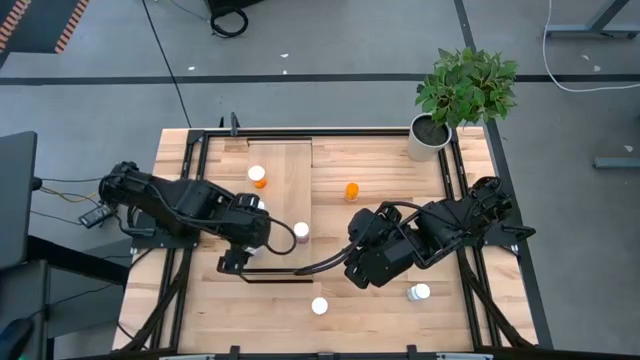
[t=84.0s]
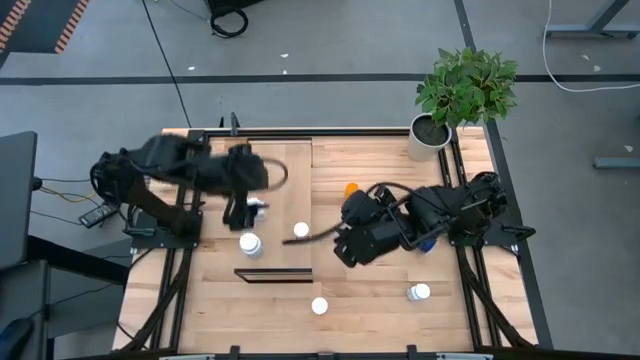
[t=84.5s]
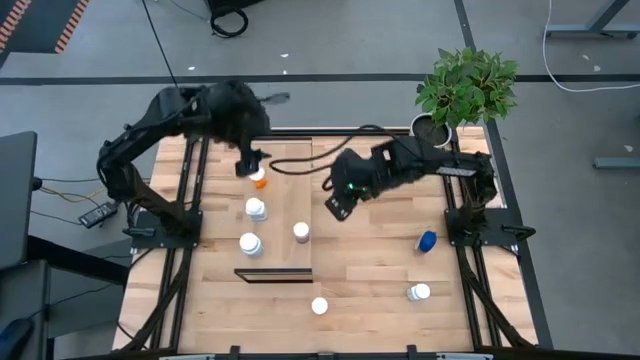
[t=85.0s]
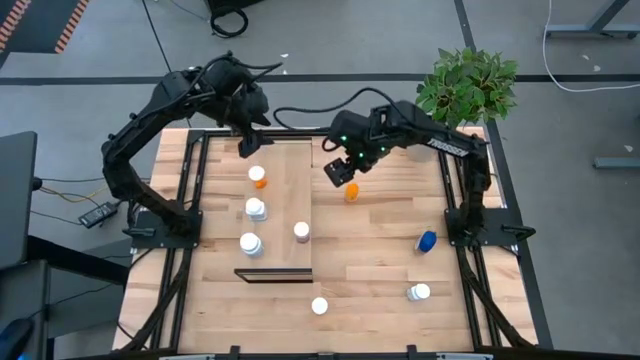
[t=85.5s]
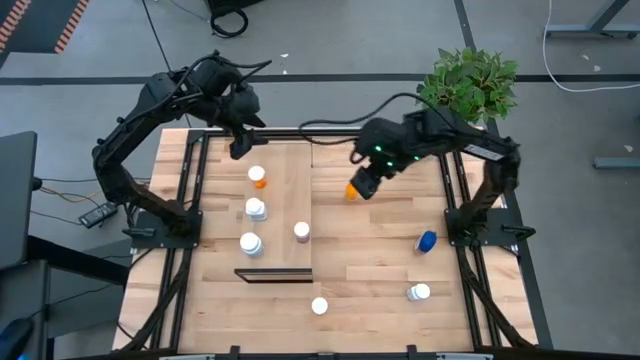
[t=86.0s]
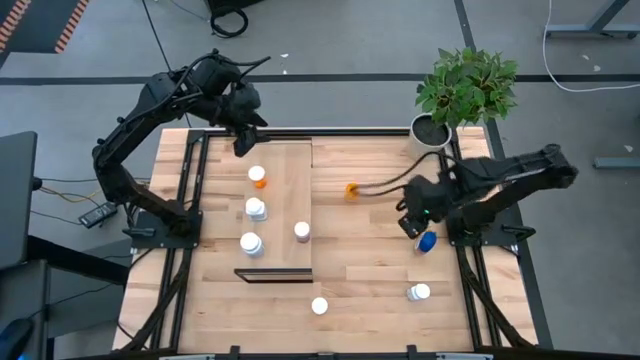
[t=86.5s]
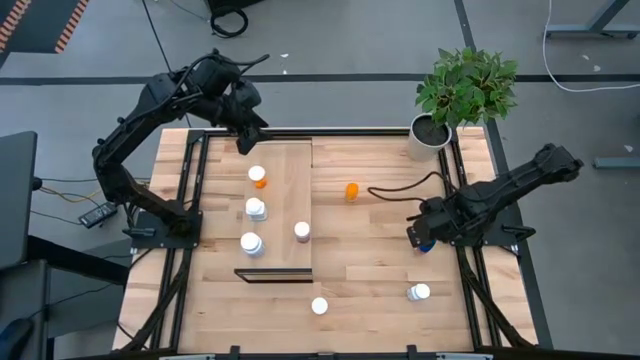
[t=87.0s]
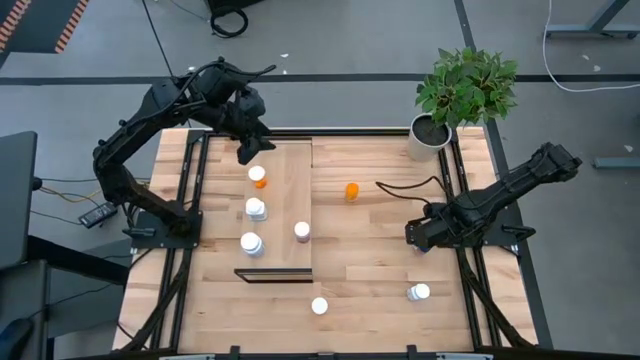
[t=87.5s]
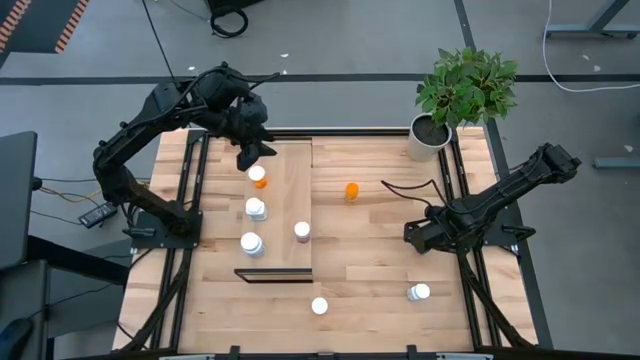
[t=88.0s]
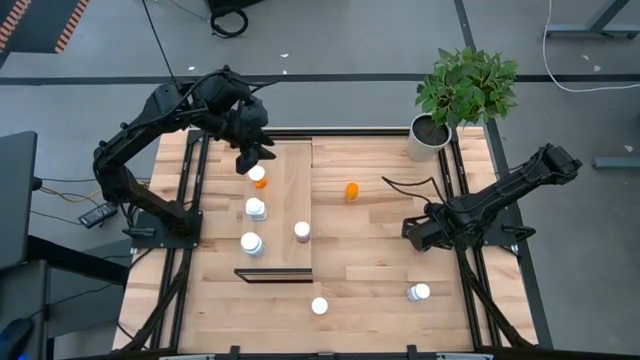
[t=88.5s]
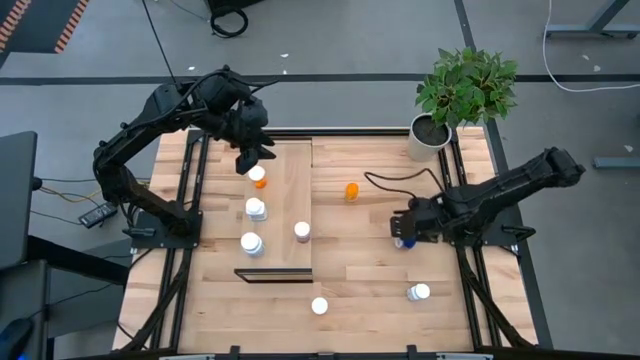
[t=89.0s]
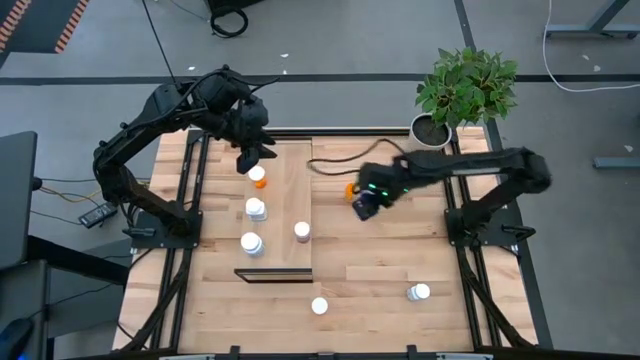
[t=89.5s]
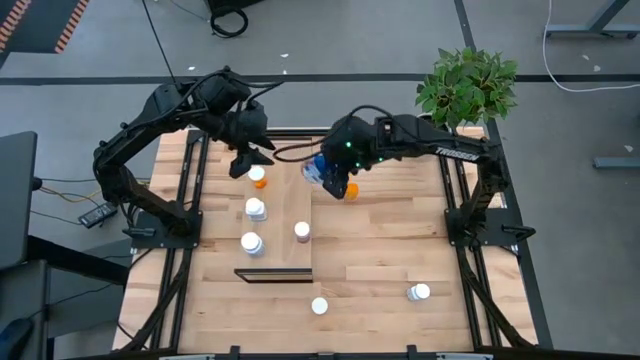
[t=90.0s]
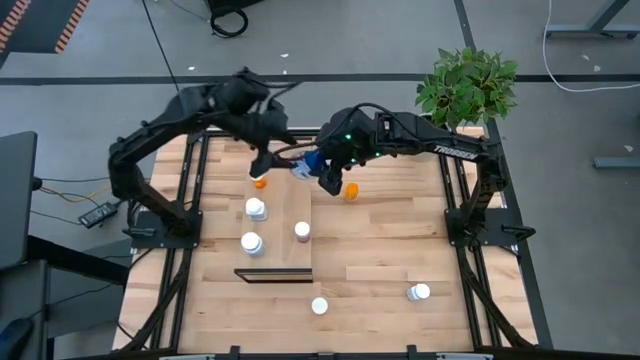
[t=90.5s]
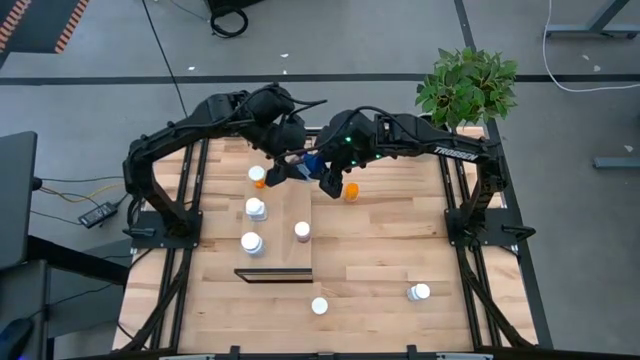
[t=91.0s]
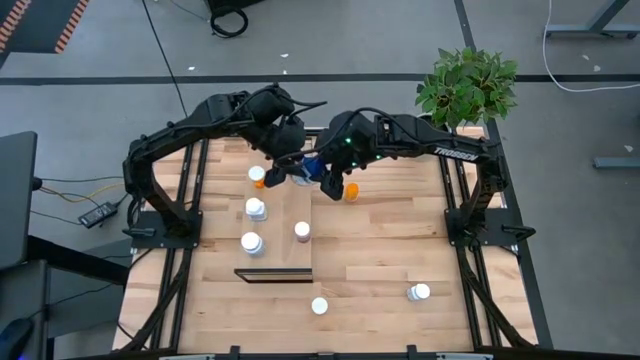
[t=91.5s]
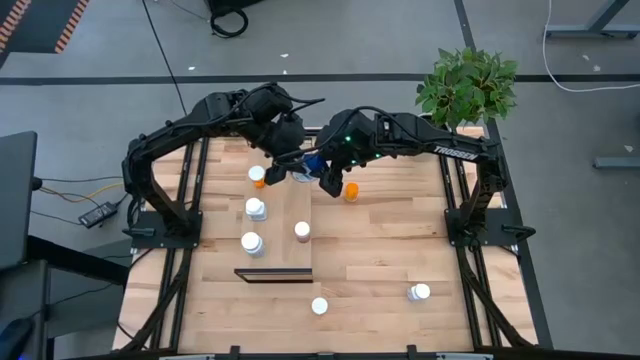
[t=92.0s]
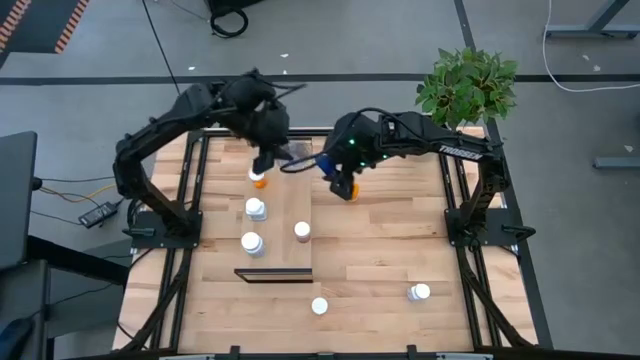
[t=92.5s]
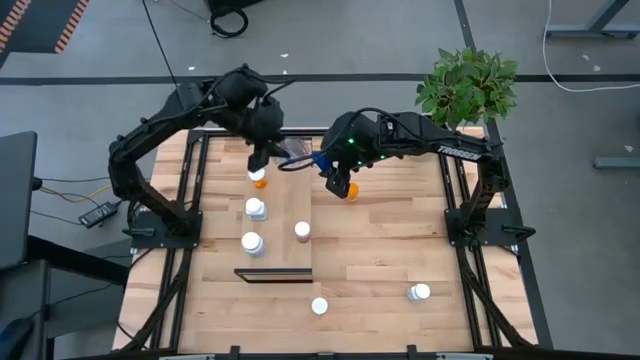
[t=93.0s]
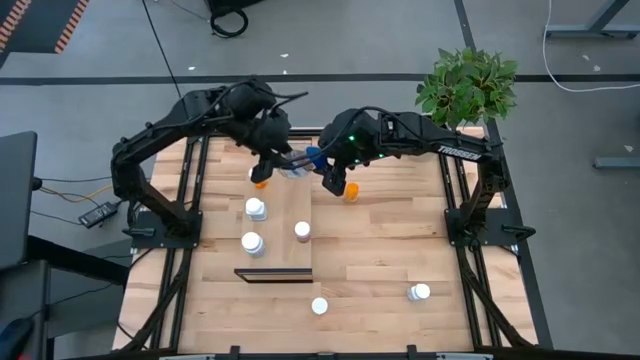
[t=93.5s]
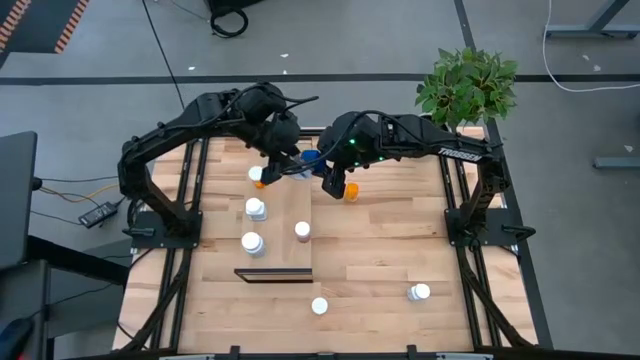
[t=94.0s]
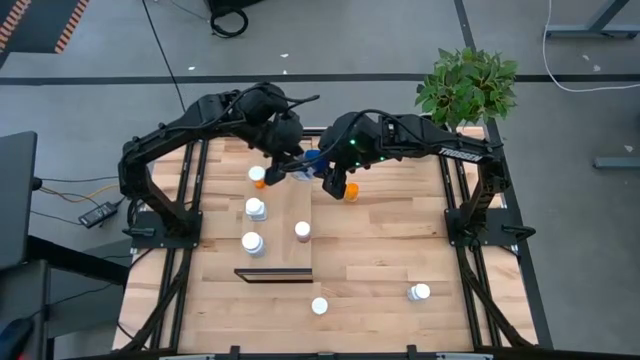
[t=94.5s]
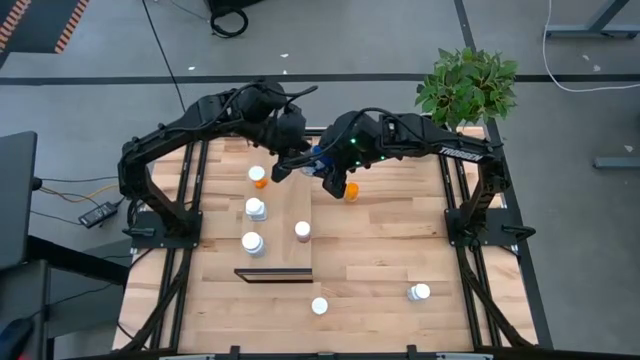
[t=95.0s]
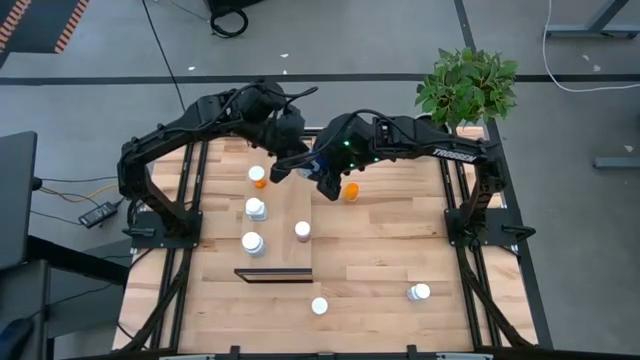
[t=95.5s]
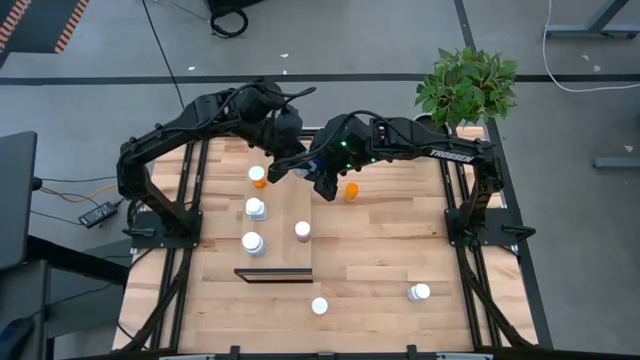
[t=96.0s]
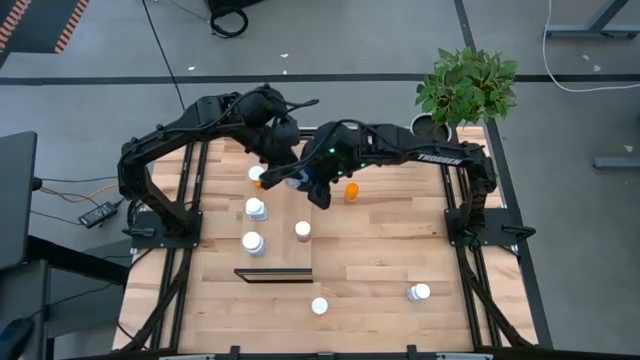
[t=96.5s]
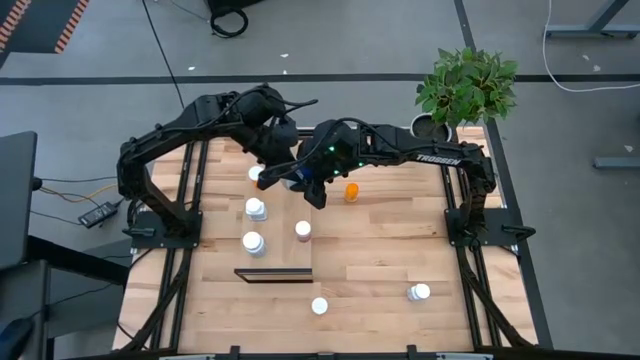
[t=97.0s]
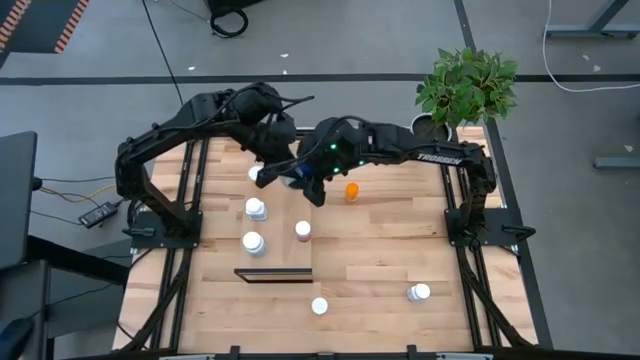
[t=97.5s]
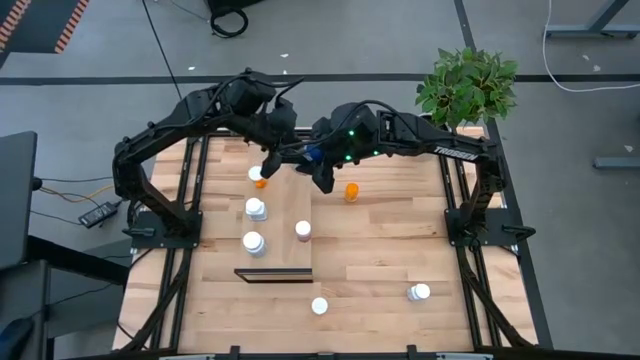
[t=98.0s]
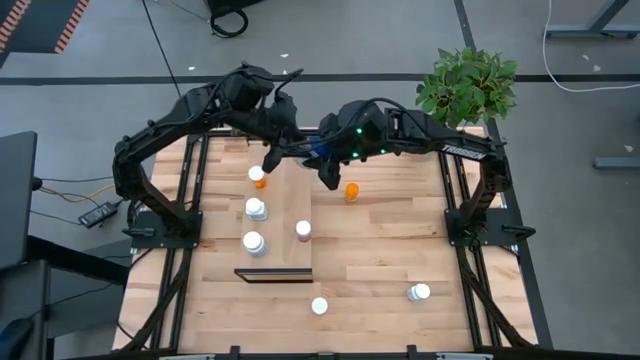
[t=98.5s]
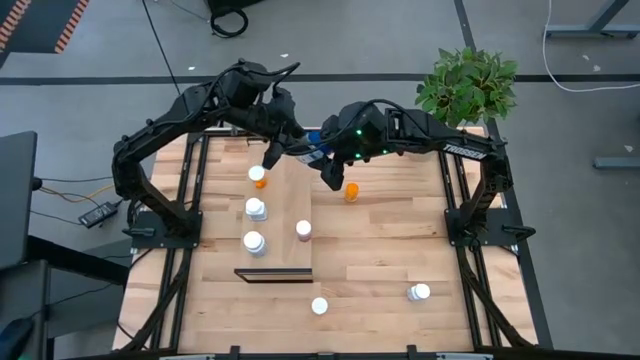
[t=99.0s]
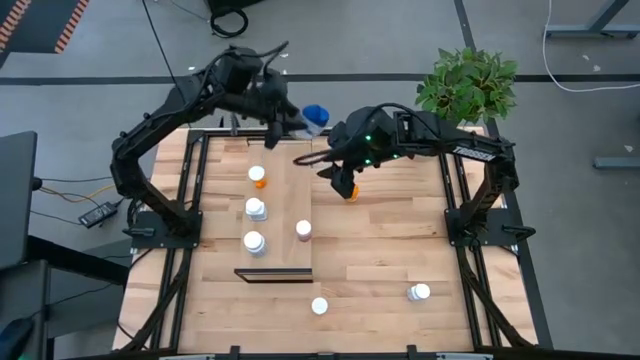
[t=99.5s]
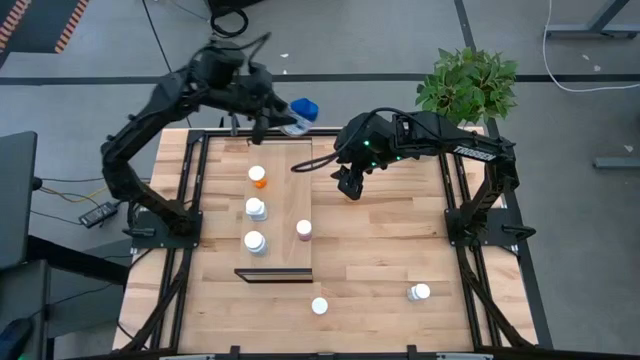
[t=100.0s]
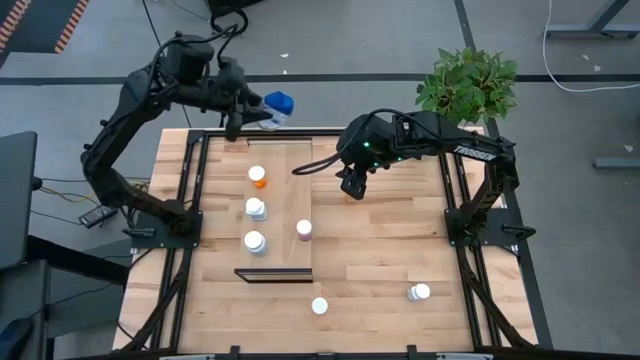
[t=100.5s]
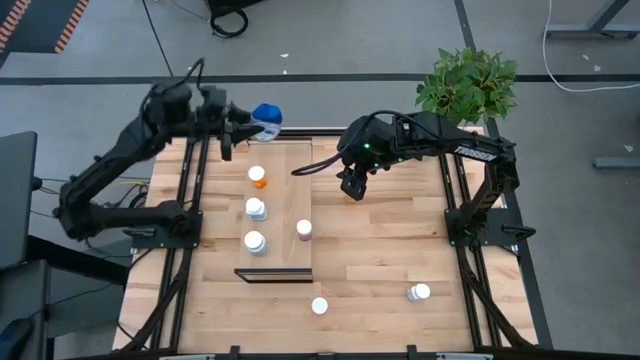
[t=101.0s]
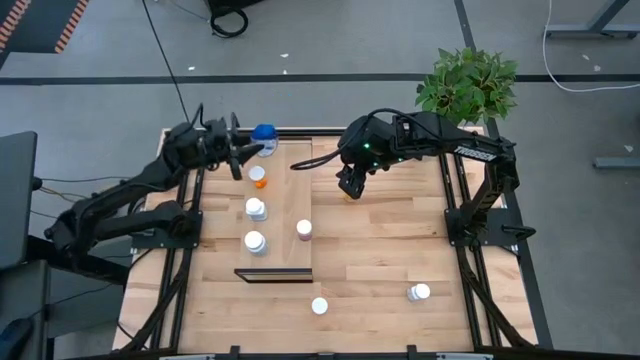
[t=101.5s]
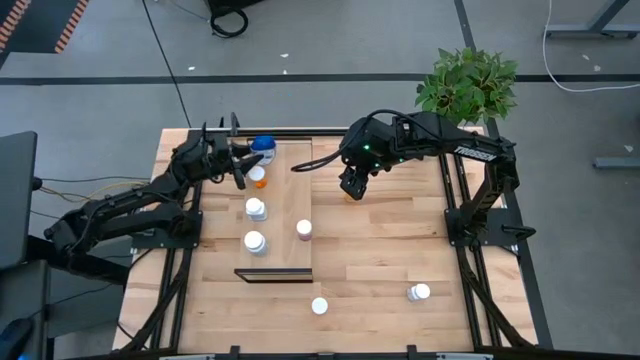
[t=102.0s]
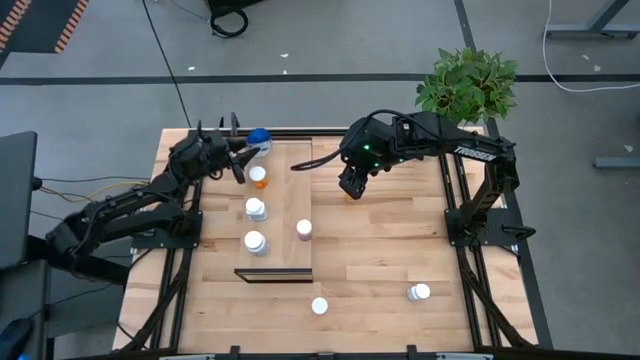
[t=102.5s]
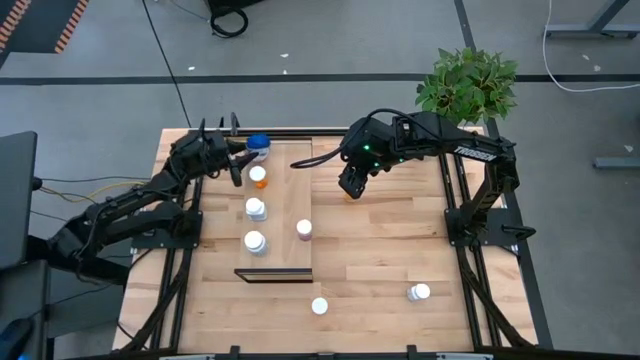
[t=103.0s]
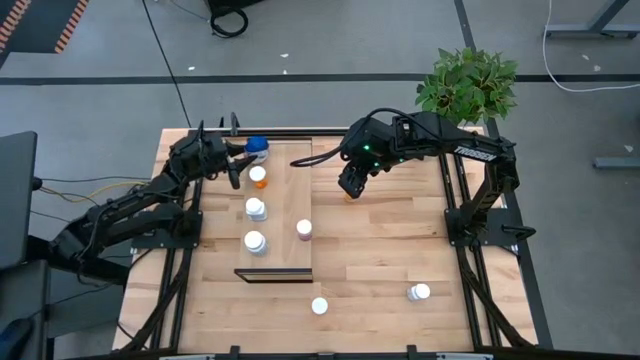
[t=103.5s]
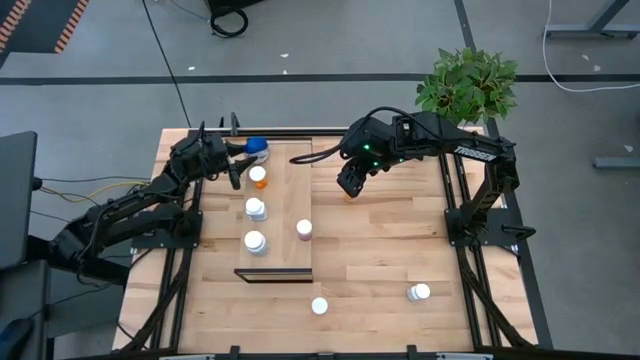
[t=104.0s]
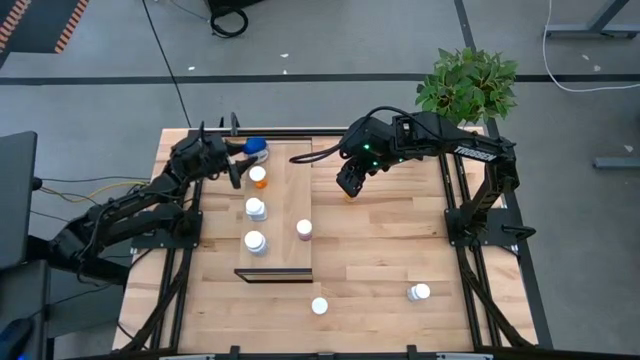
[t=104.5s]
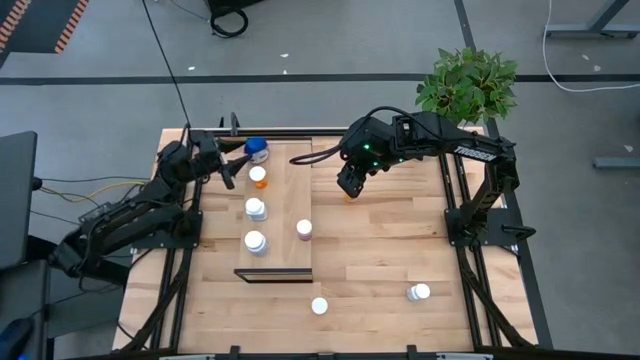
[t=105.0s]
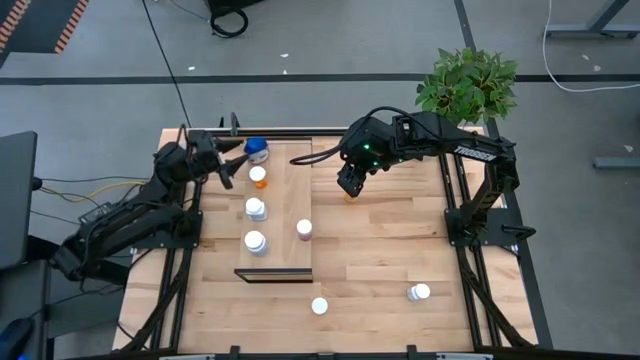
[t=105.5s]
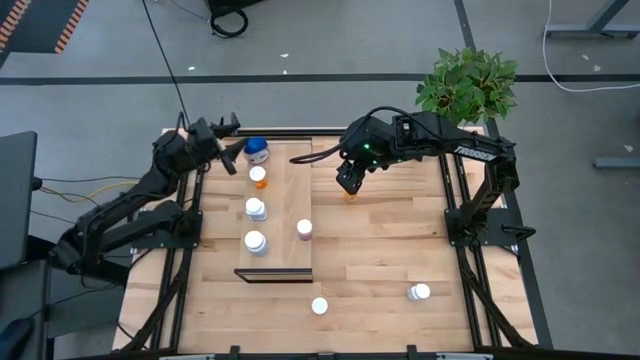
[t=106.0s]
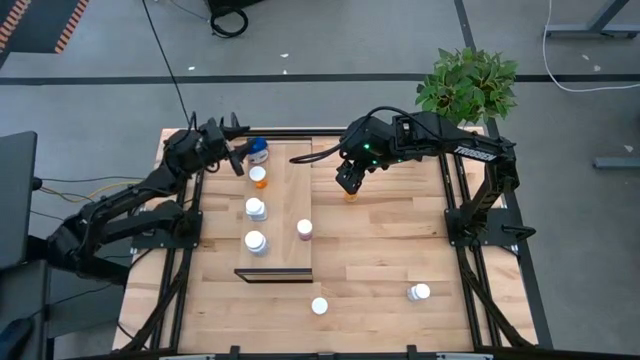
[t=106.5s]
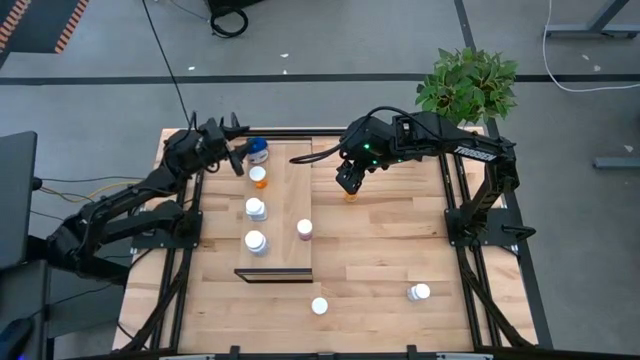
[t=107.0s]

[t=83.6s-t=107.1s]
Task: Pick and place medicine bottles onto shelf by color
Put the blue pill bottle on the shelf
